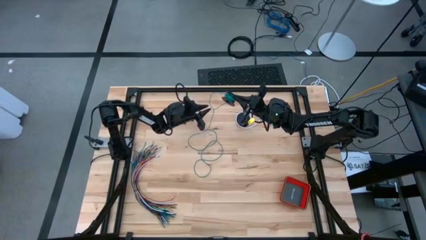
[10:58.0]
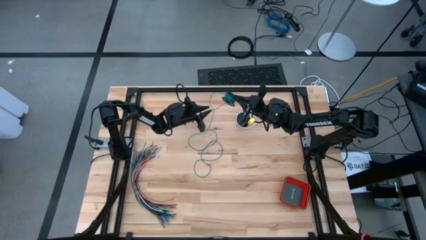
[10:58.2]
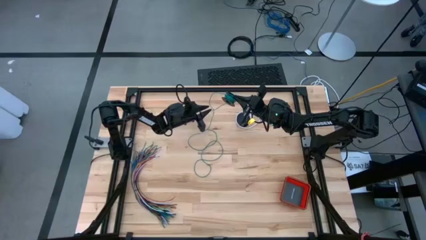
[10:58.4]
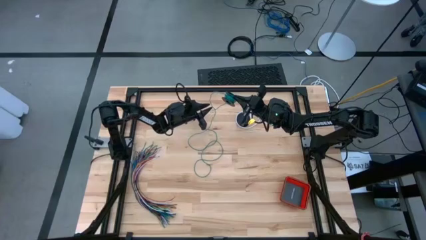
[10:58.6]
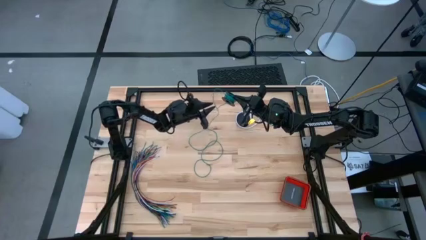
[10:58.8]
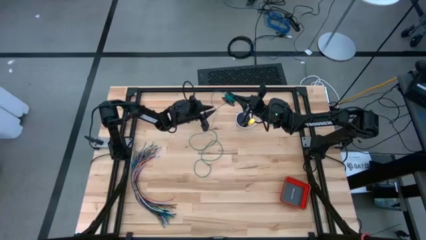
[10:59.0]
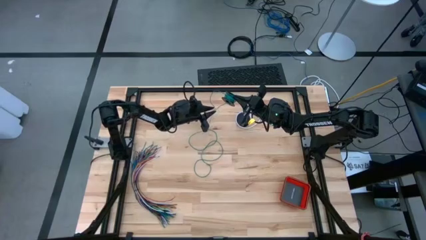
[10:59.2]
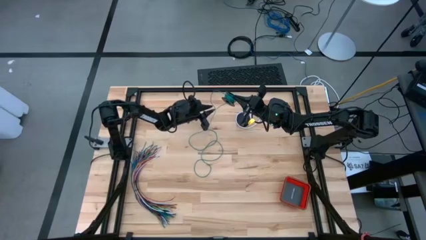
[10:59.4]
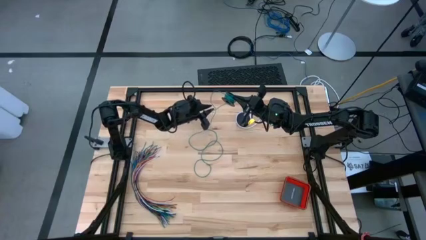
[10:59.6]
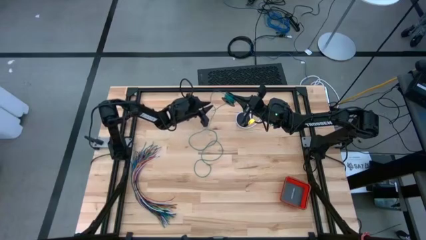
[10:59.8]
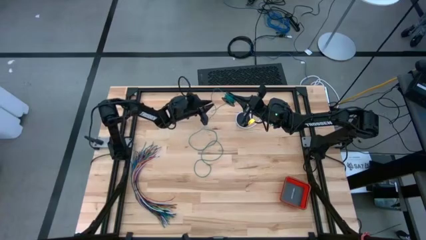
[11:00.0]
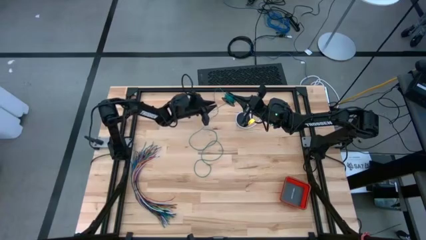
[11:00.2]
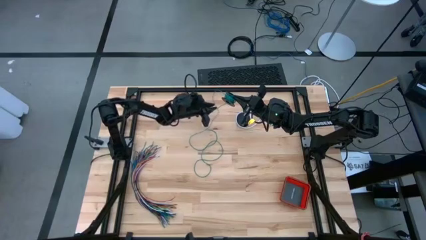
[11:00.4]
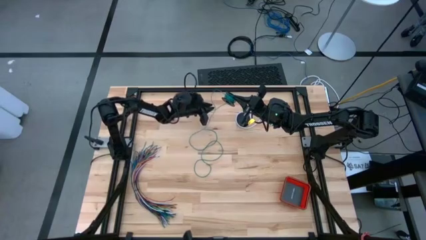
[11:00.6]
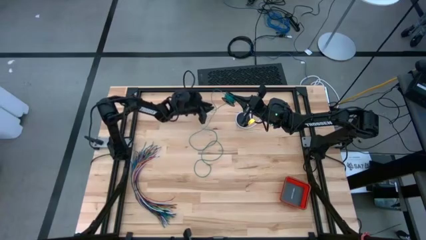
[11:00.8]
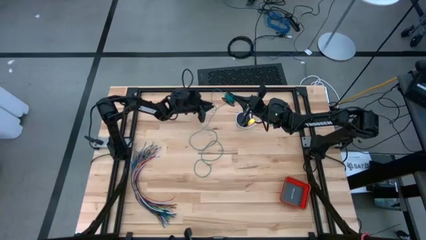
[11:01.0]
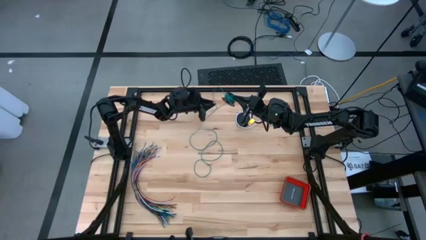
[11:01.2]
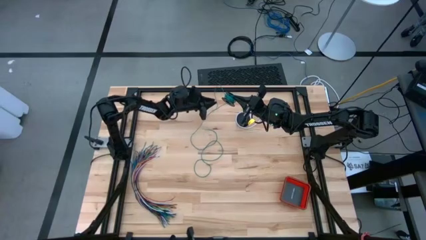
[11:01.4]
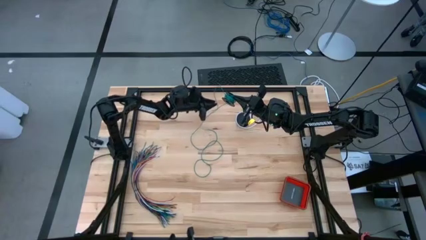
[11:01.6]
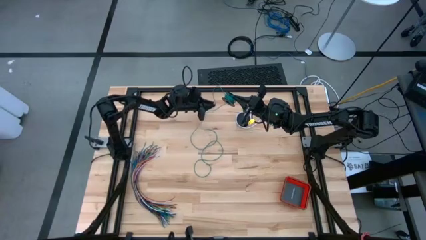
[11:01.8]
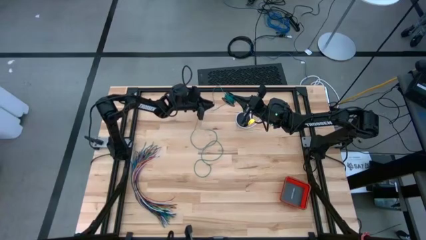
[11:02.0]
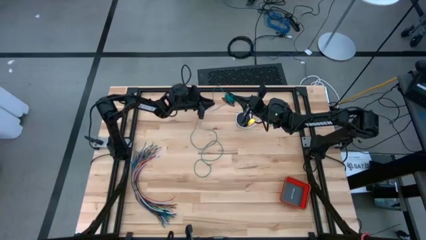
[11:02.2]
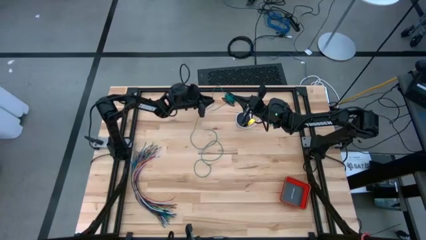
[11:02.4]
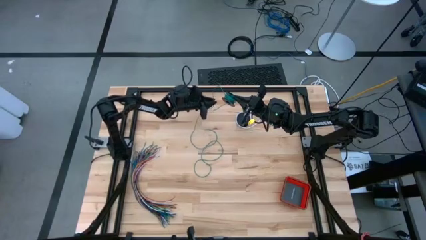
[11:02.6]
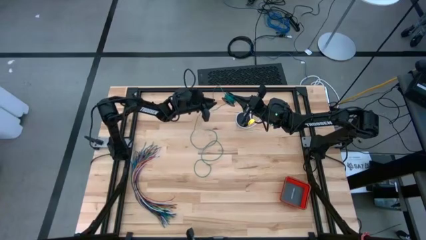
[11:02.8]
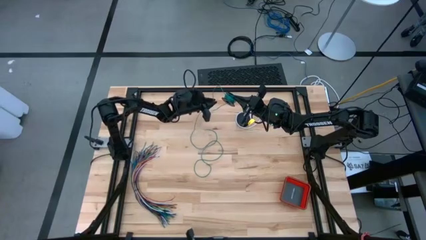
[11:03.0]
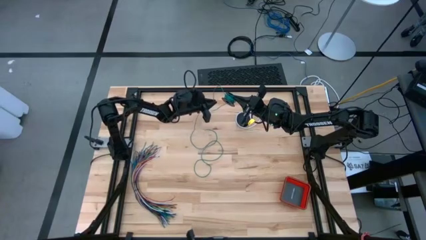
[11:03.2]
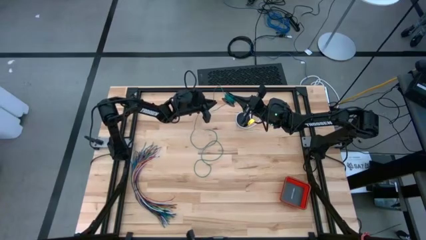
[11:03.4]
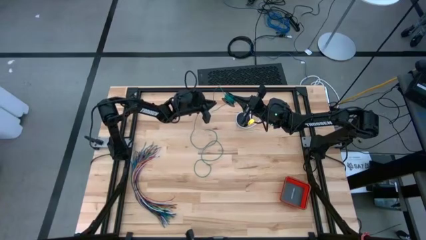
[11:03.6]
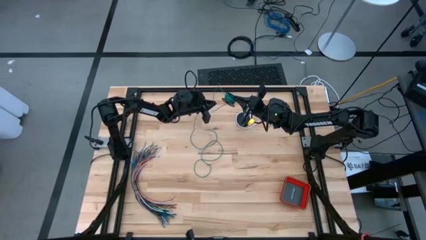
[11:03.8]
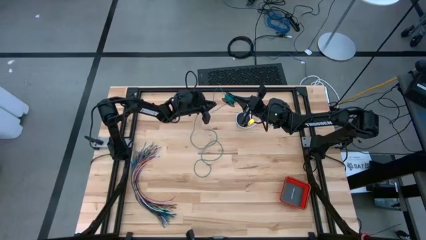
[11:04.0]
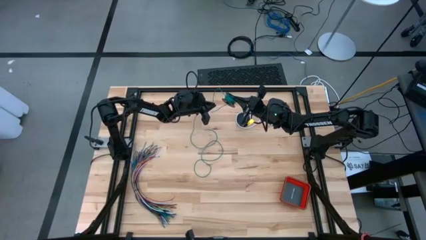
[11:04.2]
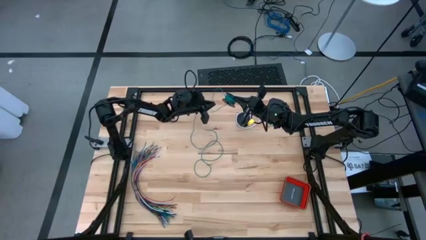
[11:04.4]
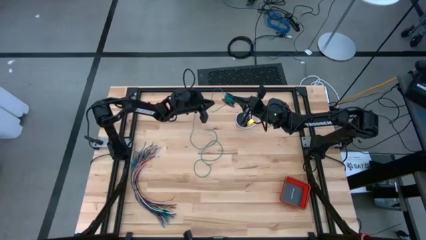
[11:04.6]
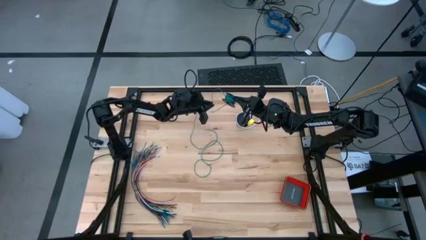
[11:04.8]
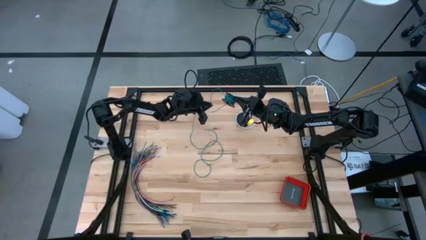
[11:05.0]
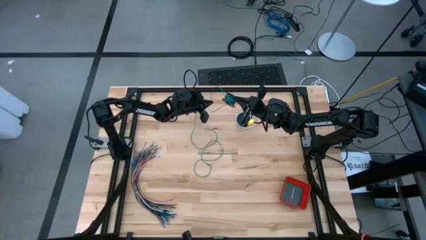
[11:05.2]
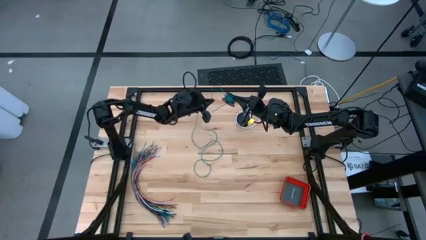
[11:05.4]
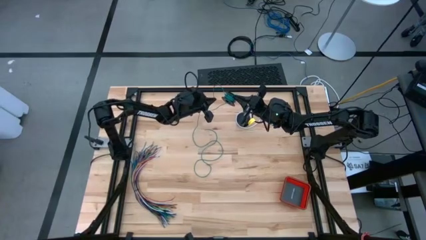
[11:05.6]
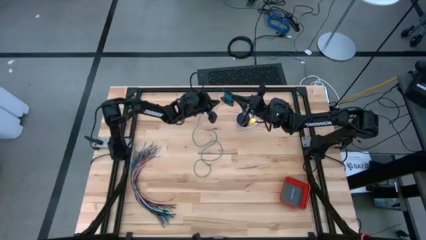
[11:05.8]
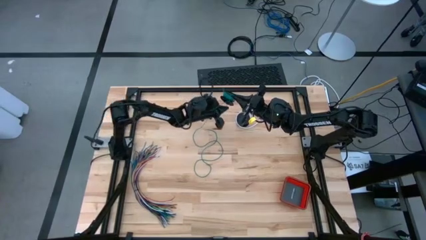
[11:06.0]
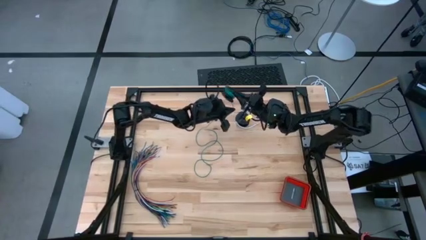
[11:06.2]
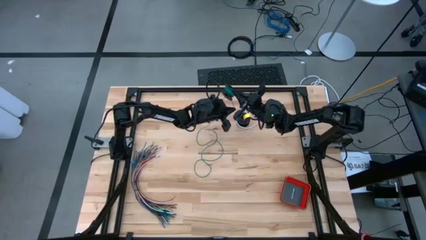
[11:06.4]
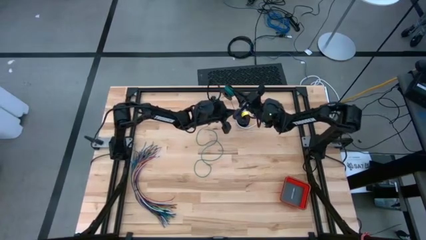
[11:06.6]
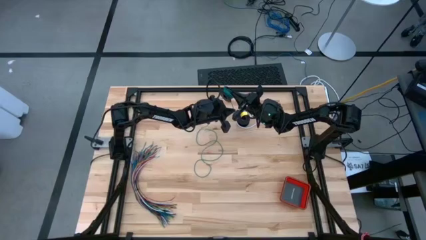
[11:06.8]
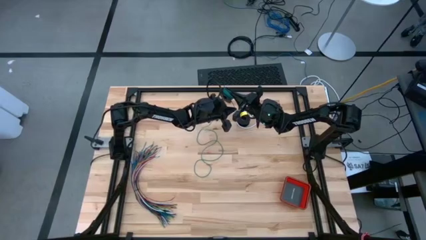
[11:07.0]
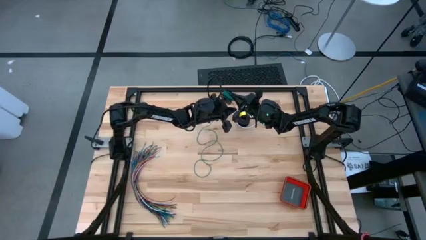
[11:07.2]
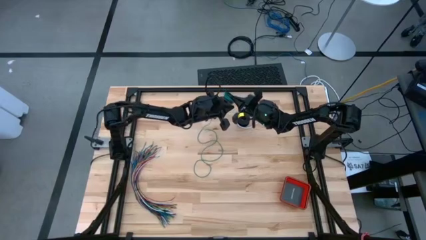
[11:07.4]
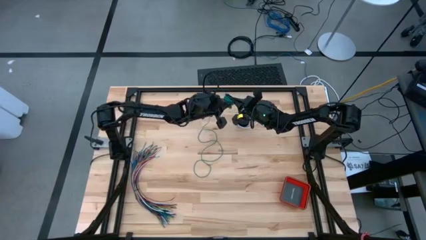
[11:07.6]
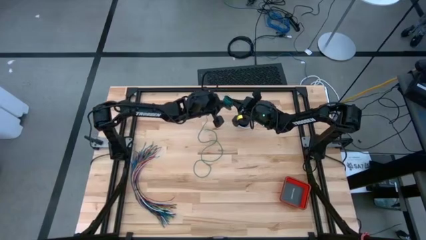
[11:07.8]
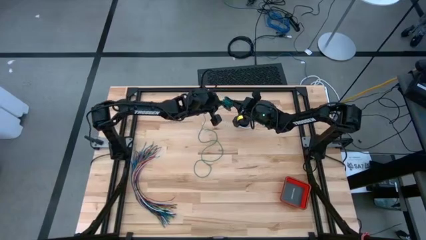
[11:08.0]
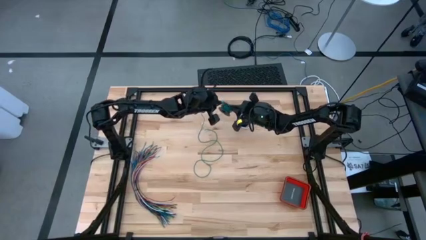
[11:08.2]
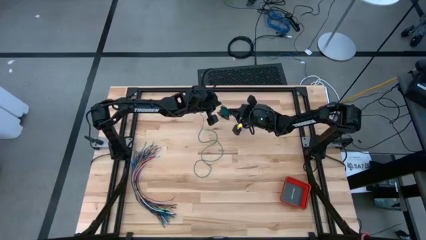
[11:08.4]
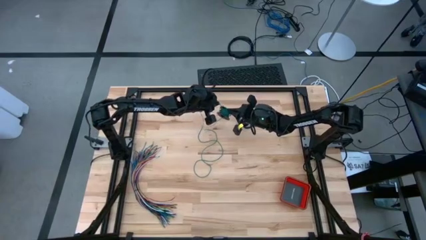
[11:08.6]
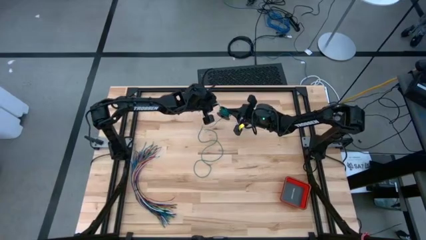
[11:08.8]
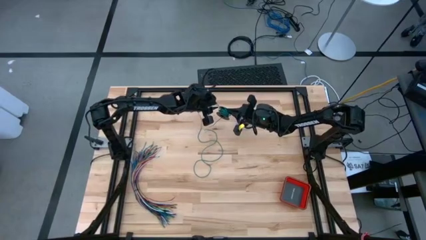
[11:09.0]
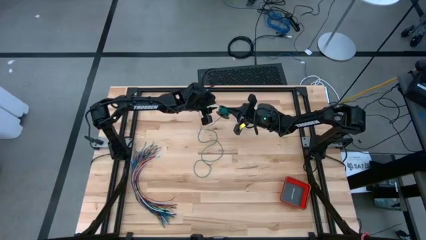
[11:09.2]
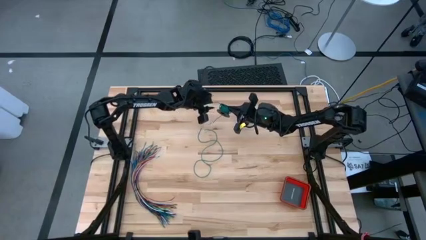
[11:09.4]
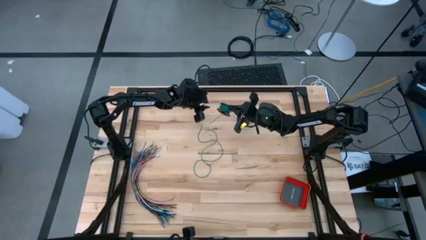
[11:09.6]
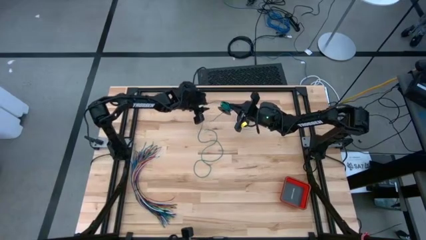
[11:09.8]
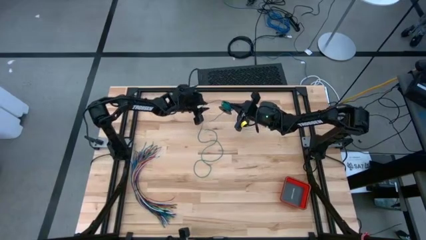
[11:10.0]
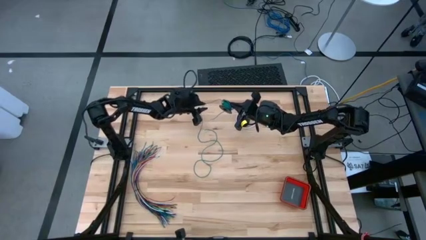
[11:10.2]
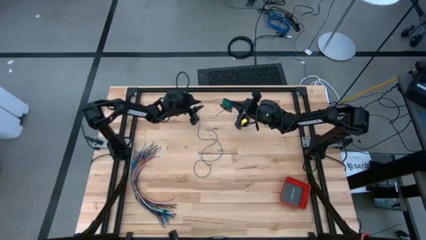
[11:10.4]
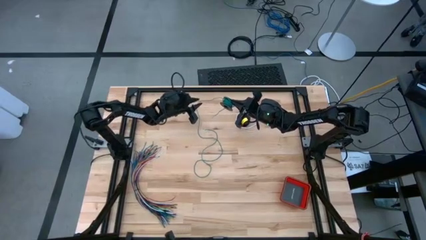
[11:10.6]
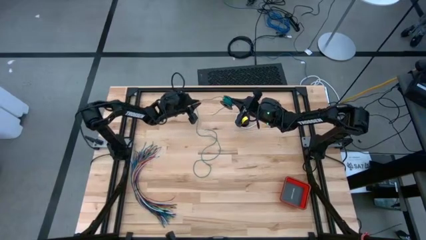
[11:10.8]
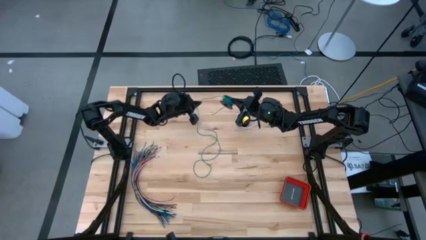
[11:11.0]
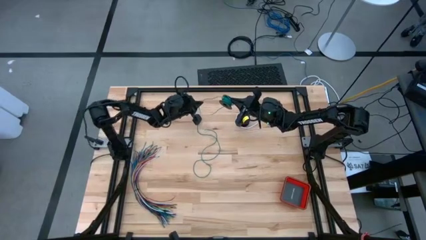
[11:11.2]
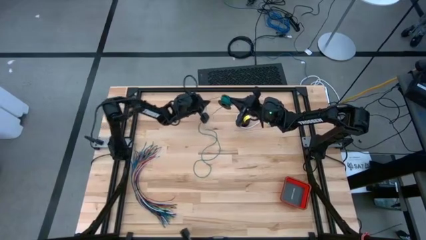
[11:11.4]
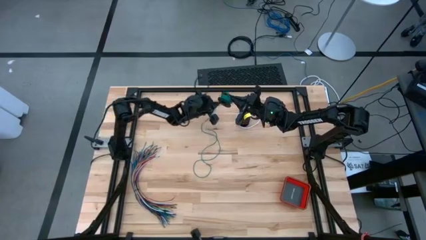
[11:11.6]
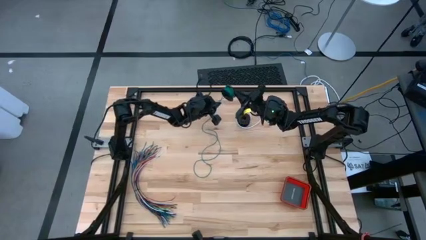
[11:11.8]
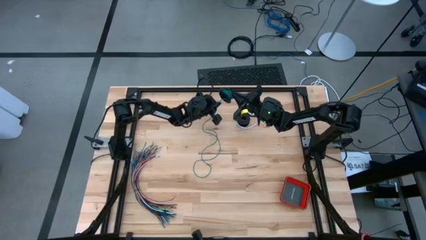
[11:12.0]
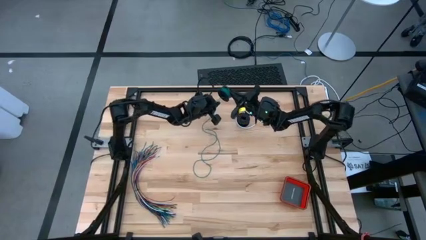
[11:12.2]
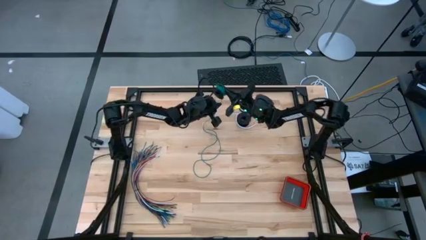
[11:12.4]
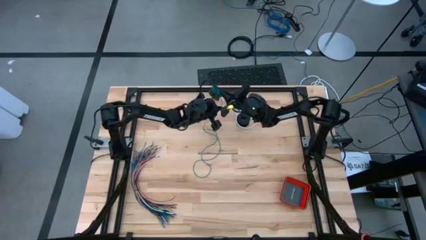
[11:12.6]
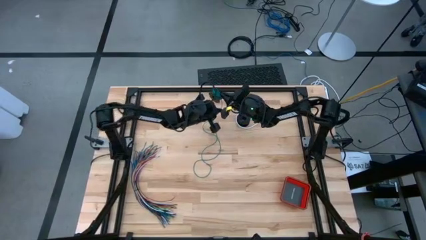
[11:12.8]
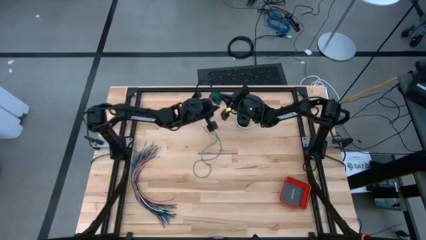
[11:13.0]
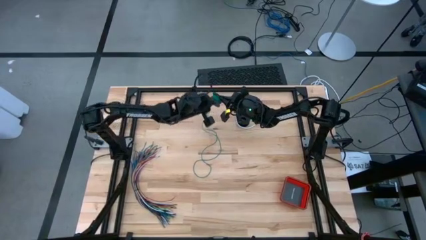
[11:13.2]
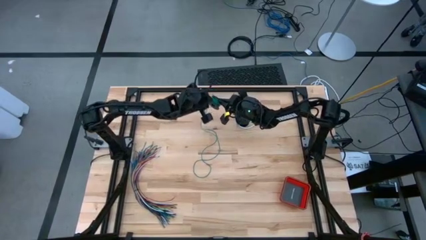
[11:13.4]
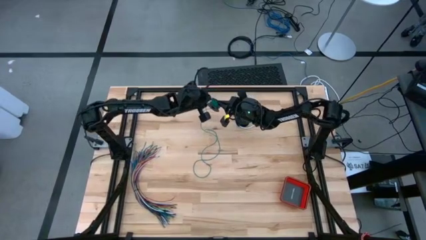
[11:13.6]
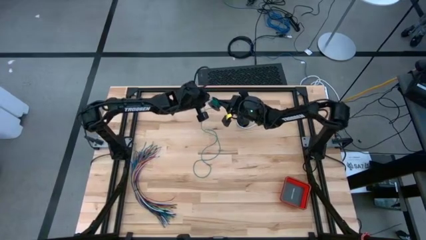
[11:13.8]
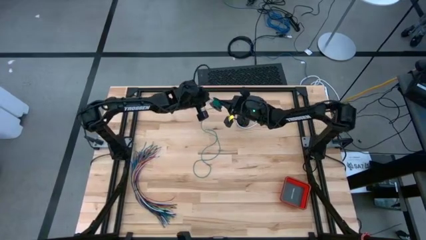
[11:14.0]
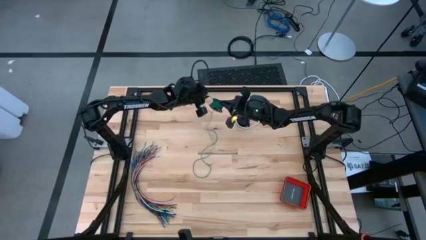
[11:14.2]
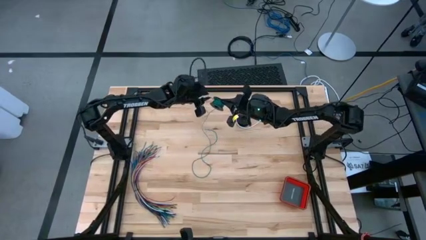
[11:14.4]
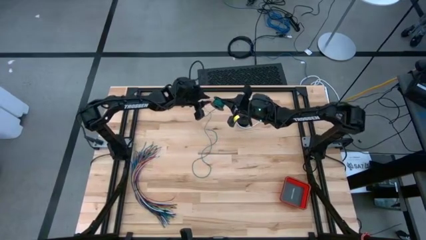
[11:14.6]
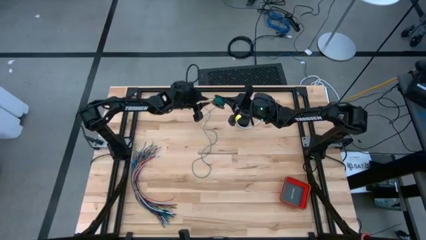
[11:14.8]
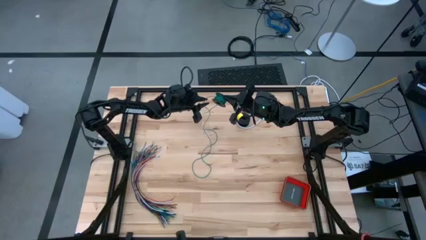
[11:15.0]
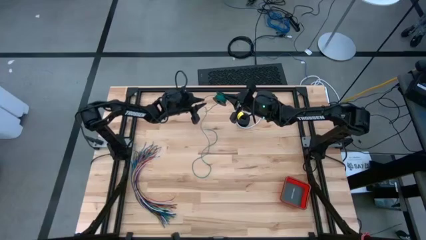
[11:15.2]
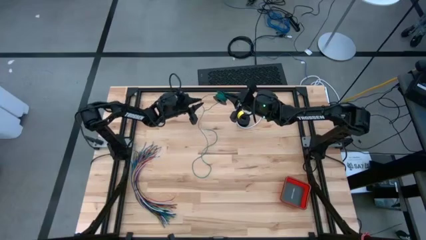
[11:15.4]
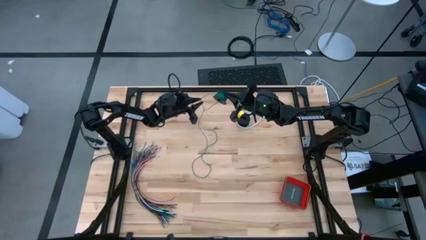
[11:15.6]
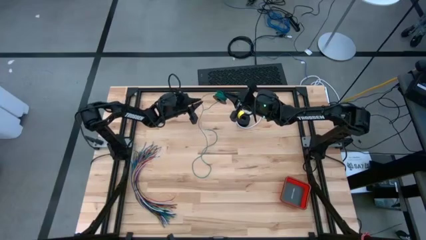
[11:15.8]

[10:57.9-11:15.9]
Task: Coil cords
Coil the green wire onto the spool
